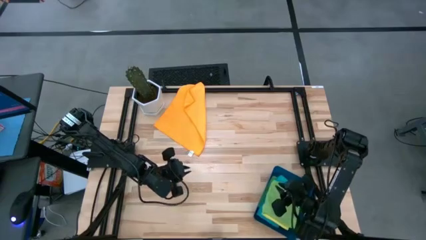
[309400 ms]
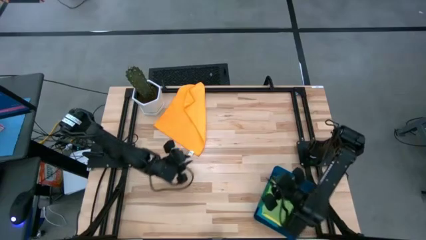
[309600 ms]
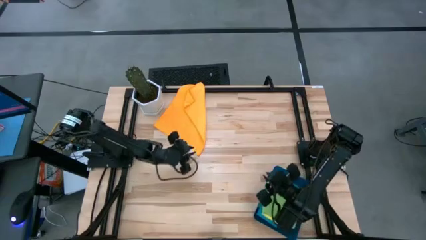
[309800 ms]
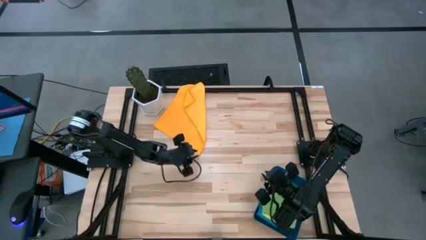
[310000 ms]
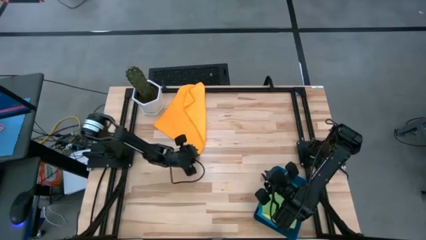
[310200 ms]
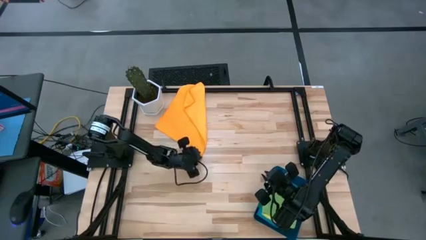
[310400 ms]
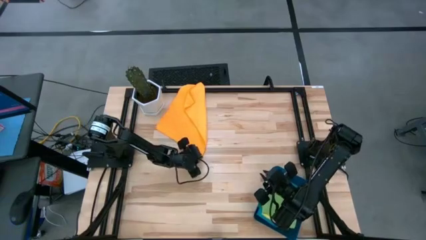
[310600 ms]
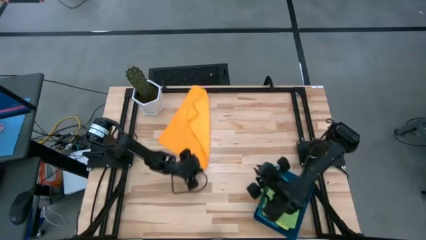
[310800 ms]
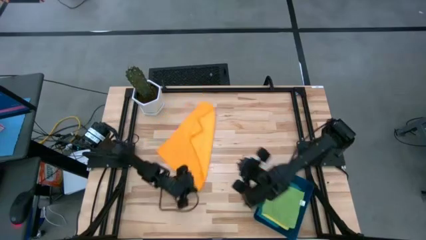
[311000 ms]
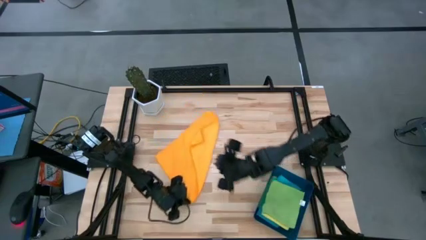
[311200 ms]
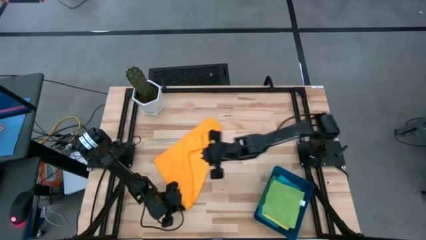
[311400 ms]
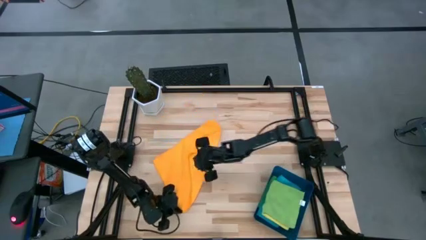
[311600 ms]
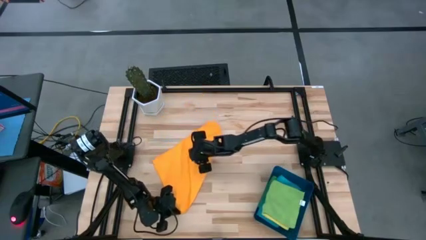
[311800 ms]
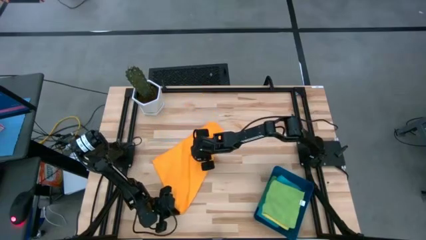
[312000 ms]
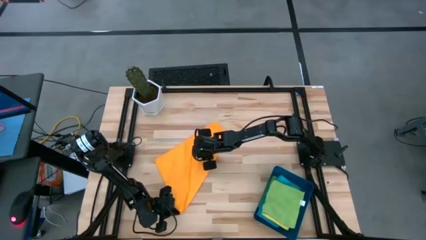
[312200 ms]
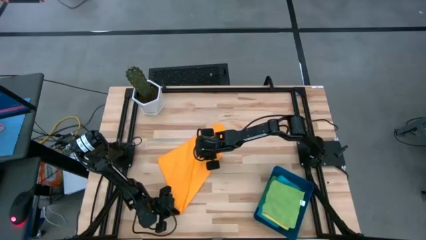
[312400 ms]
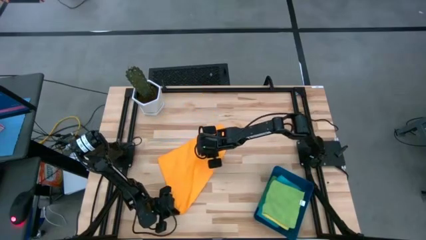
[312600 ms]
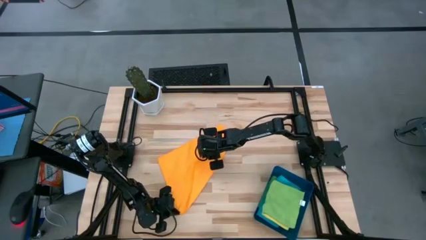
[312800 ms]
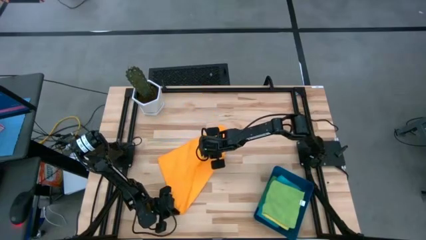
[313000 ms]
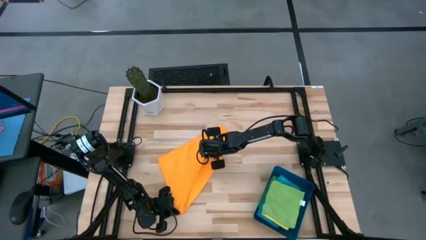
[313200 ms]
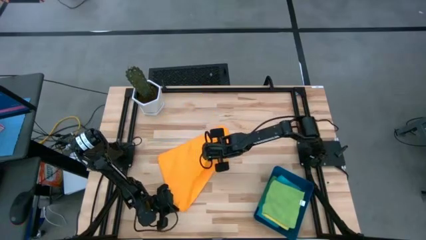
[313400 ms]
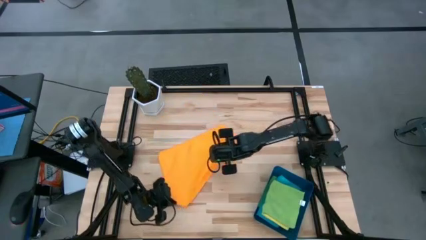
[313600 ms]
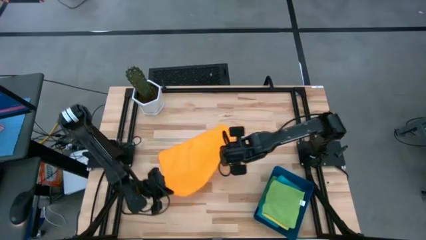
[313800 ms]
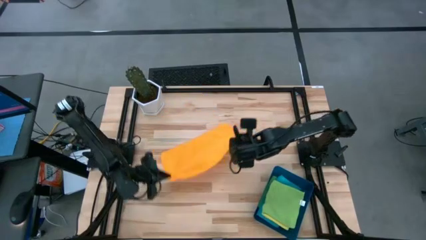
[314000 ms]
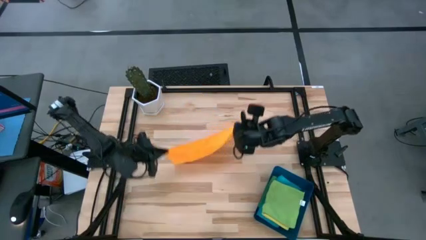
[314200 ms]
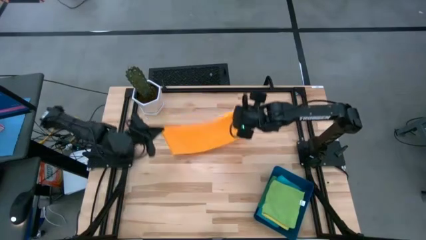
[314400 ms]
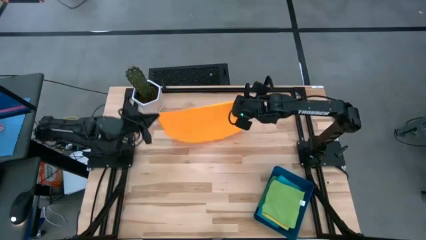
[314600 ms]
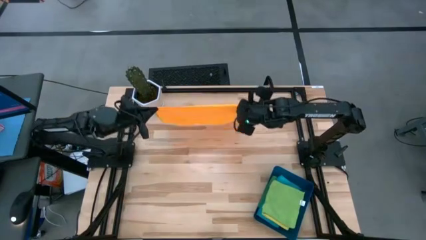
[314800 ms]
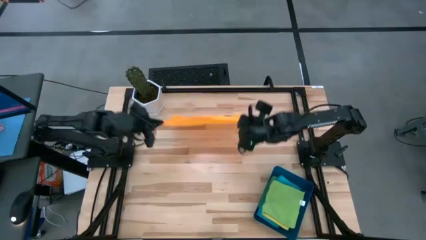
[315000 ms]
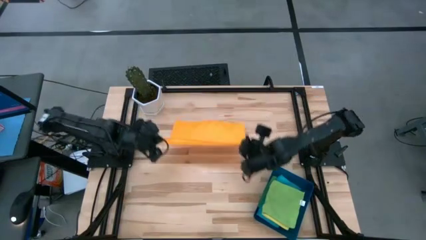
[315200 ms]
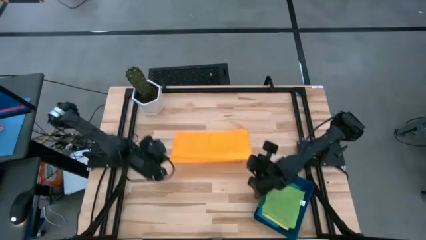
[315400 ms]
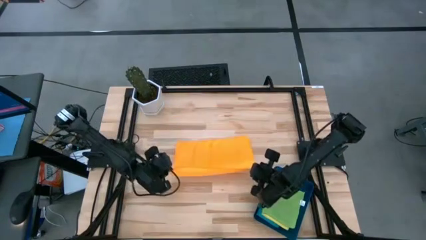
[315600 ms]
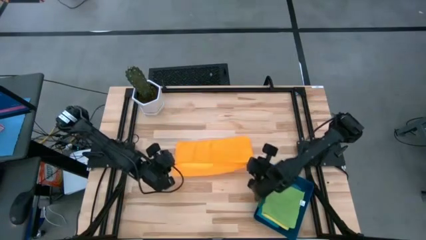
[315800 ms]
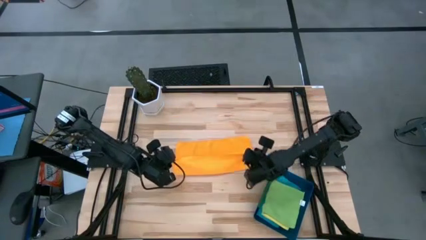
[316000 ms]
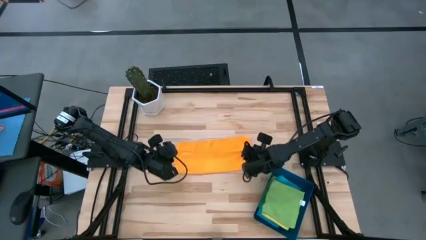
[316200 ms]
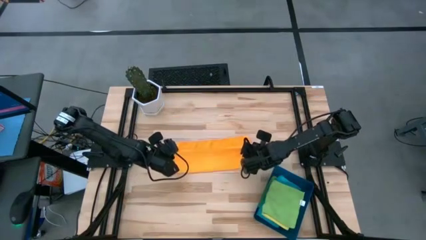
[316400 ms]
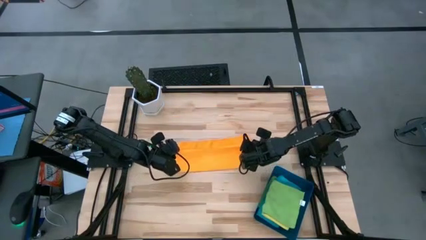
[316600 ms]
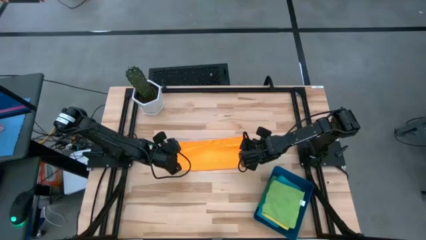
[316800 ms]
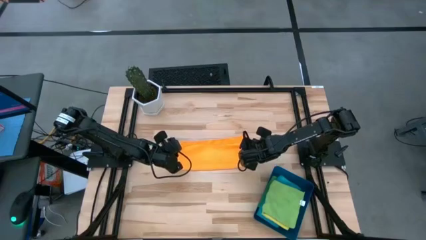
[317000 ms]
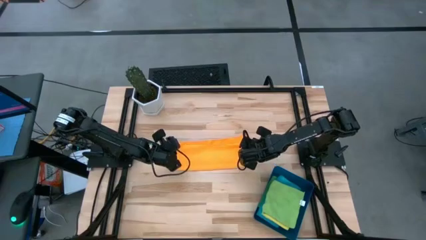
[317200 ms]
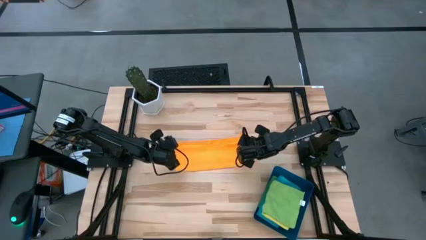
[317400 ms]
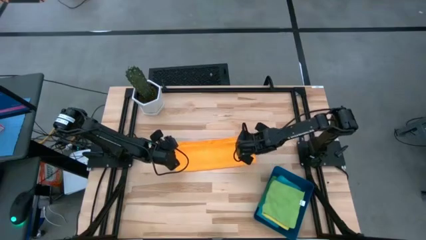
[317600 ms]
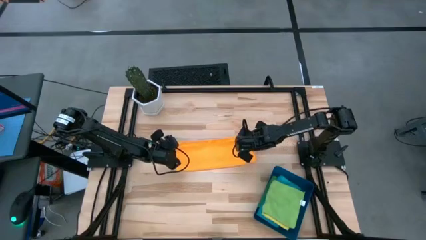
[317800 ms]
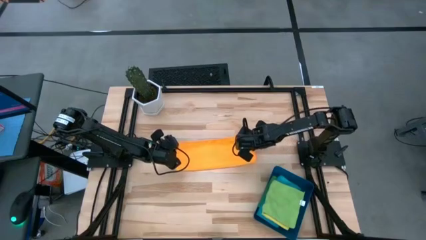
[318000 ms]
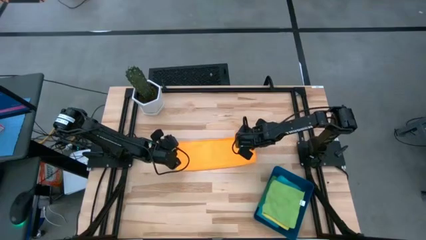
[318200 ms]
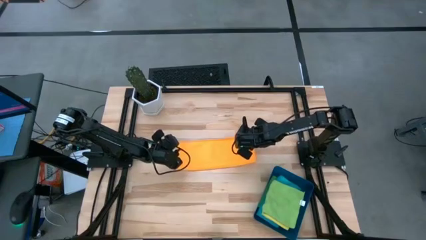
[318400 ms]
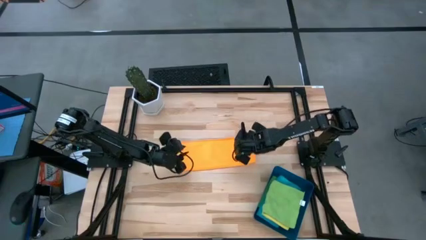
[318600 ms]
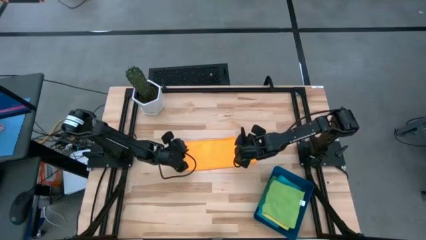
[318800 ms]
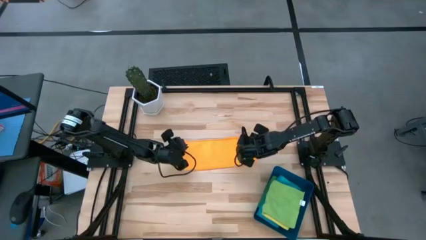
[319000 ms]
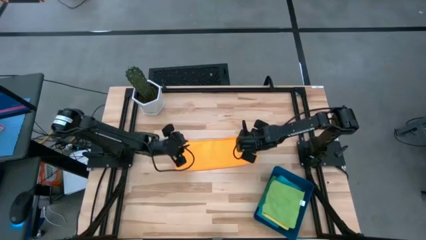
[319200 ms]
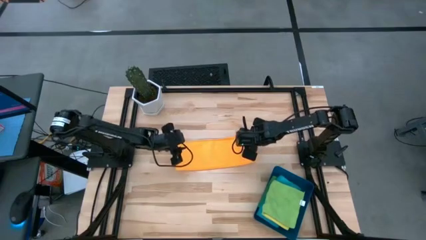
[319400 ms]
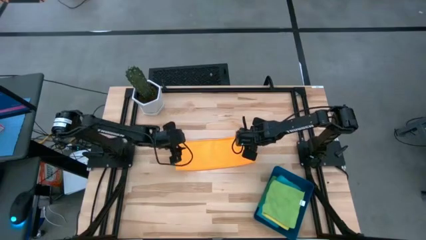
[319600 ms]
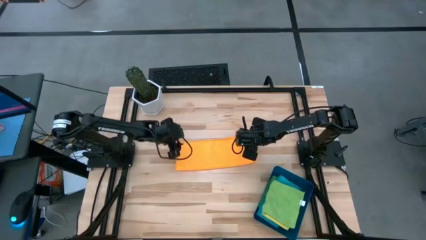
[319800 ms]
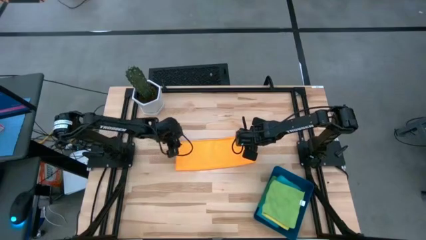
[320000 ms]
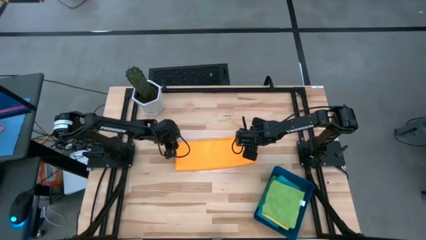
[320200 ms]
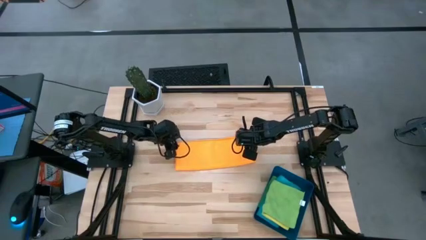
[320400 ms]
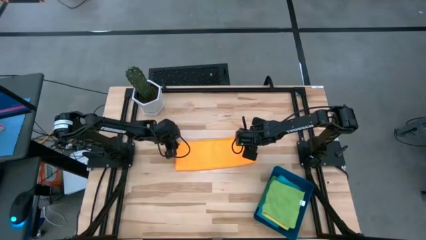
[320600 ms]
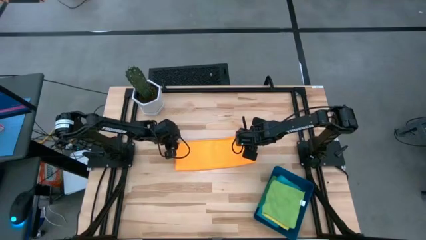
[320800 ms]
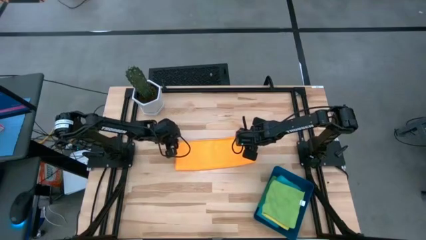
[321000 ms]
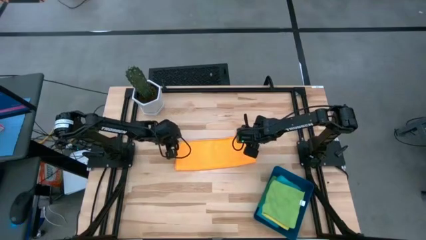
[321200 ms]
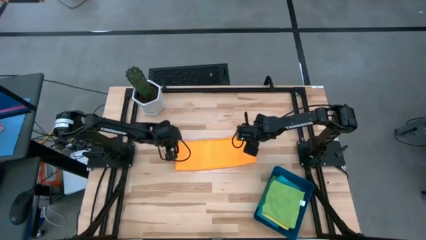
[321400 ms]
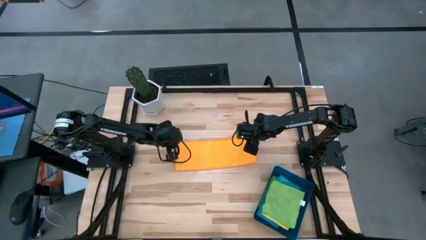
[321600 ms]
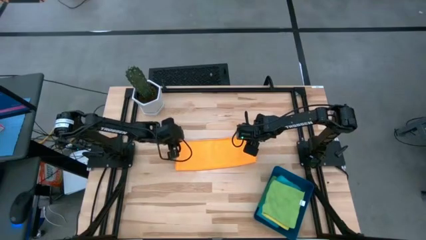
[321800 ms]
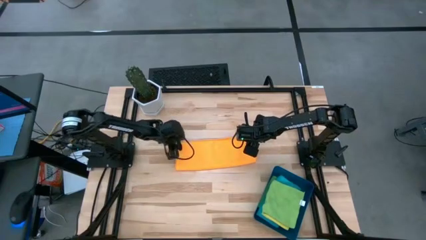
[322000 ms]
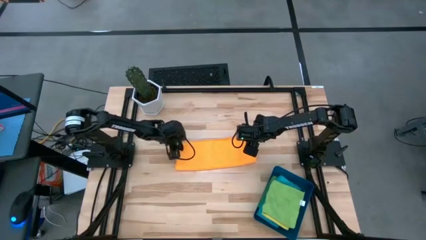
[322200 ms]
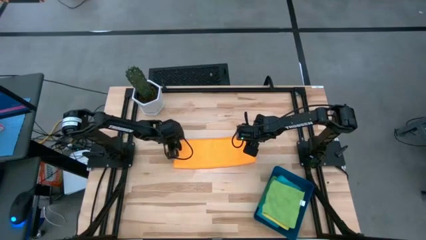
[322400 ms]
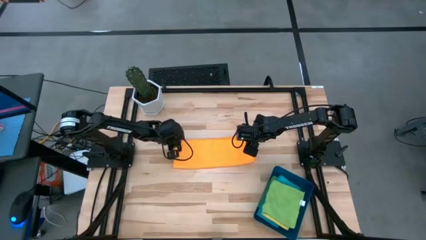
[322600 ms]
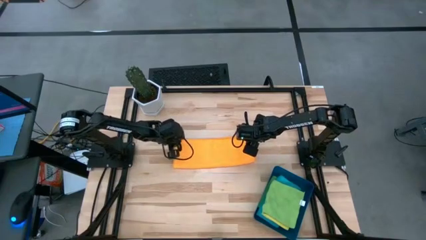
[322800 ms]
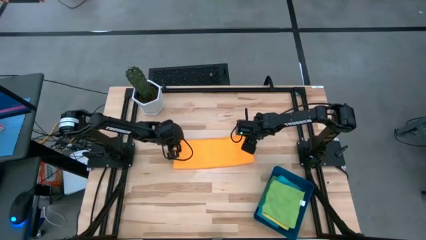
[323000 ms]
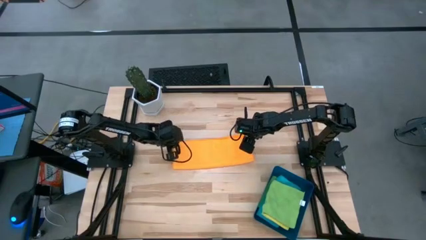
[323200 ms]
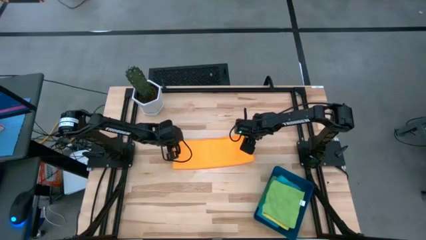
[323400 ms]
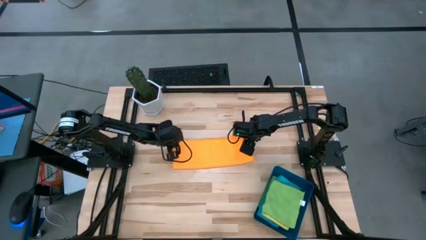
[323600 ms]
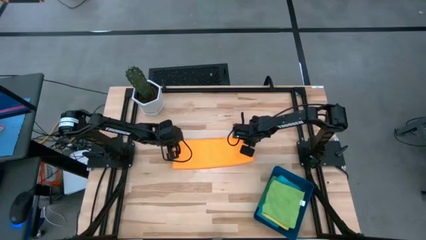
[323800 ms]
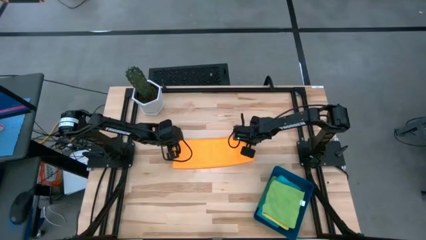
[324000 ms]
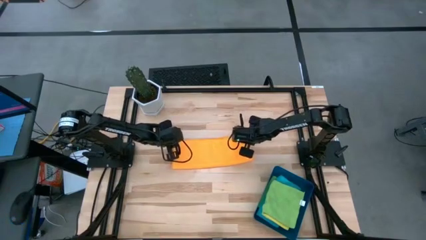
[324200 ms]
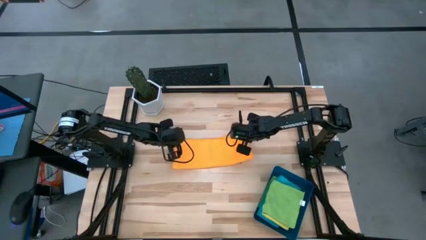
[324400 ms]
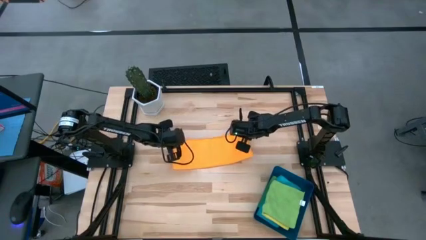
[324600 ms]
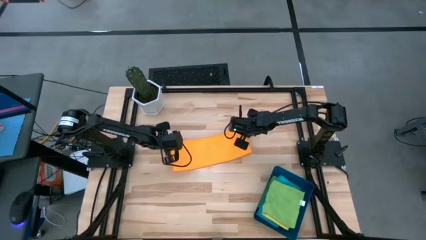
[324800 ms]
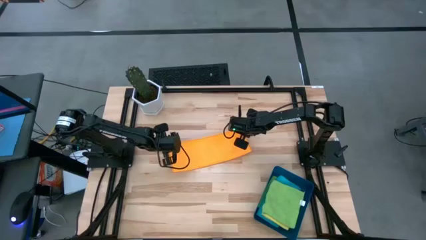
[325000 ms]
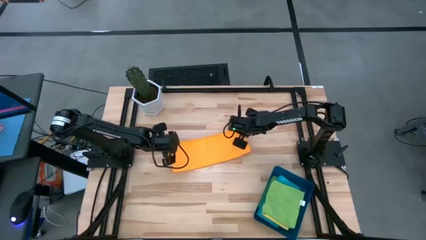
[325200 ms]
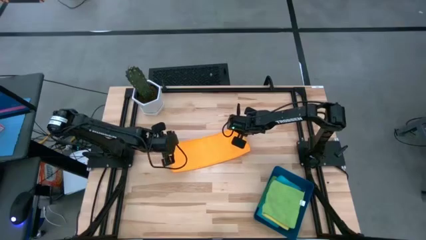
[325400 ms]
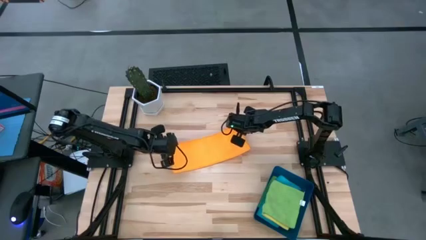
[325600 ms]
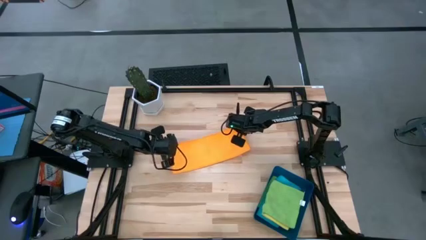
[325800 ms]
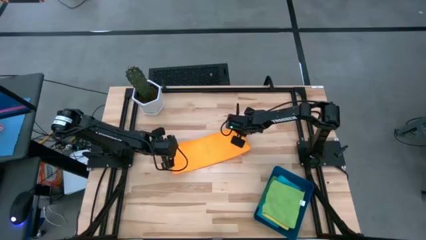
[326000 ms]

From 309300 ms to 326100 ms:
Task: Fold microfiber towels
Fold the orange microfiber towel
